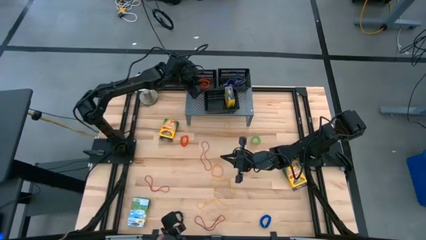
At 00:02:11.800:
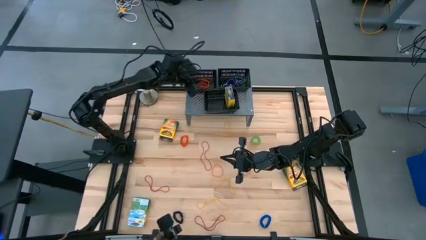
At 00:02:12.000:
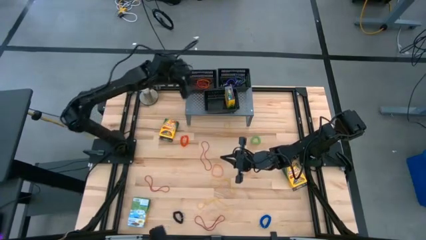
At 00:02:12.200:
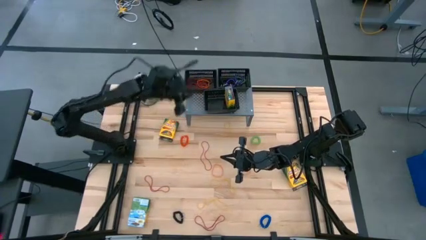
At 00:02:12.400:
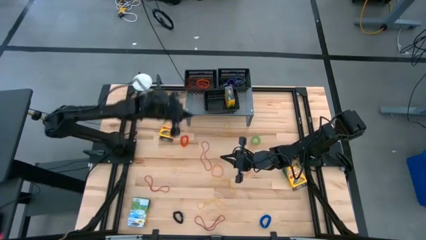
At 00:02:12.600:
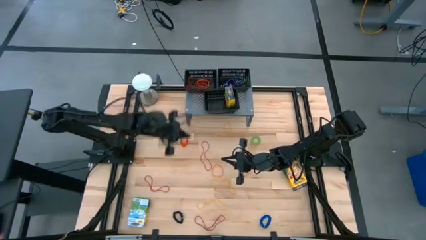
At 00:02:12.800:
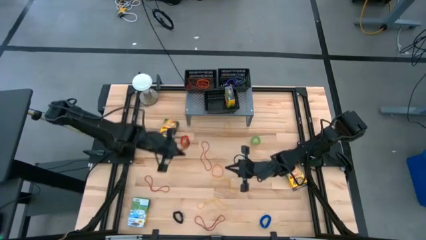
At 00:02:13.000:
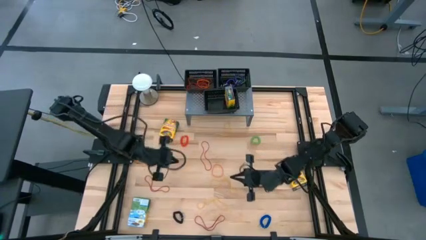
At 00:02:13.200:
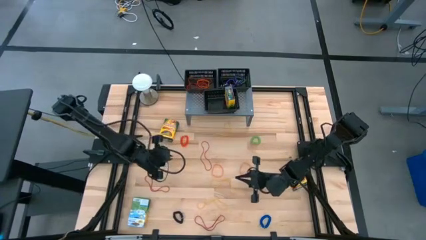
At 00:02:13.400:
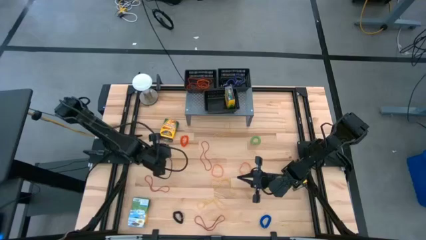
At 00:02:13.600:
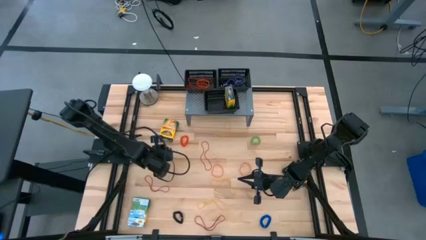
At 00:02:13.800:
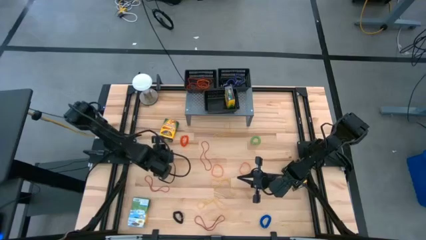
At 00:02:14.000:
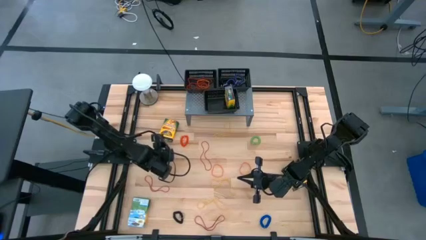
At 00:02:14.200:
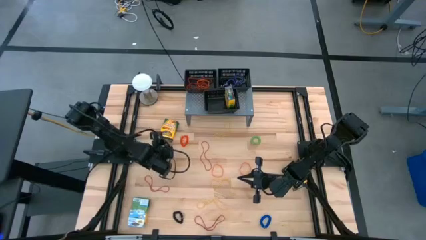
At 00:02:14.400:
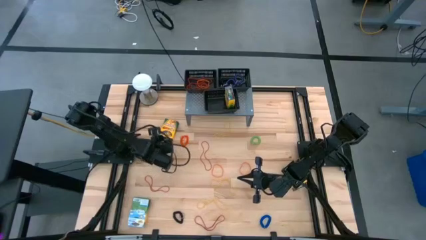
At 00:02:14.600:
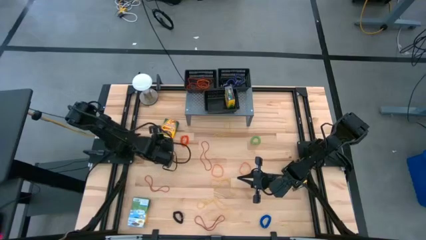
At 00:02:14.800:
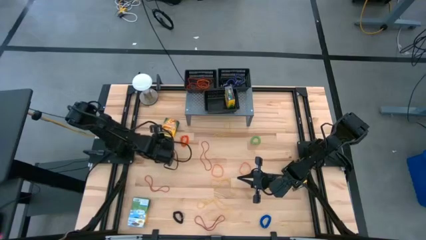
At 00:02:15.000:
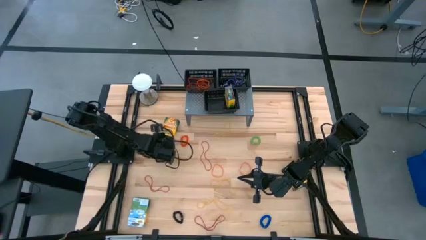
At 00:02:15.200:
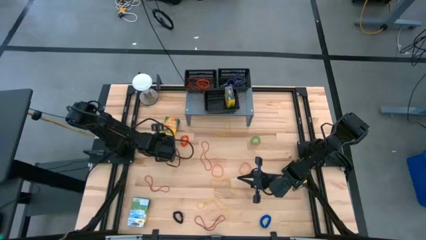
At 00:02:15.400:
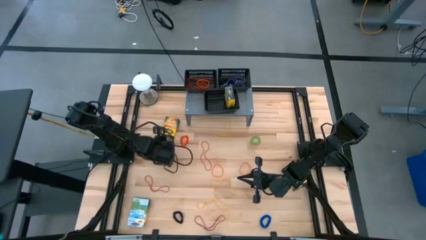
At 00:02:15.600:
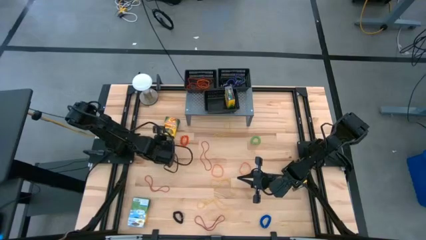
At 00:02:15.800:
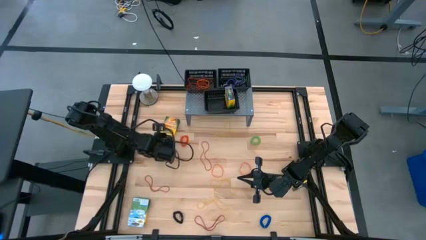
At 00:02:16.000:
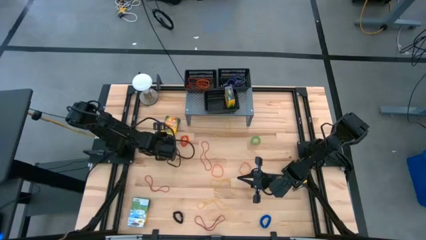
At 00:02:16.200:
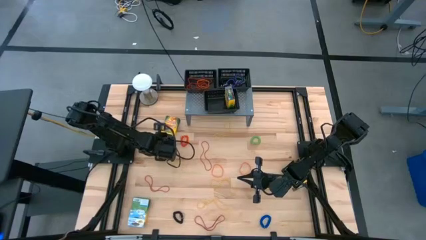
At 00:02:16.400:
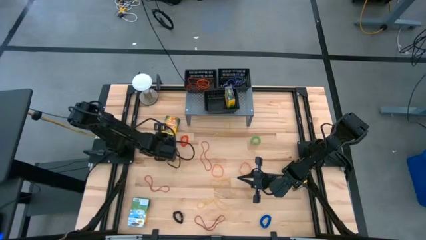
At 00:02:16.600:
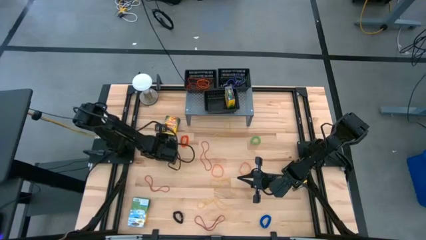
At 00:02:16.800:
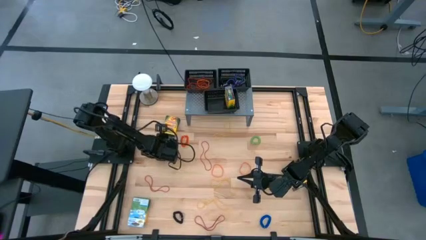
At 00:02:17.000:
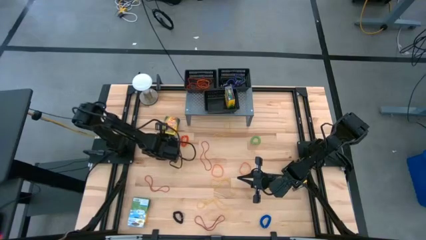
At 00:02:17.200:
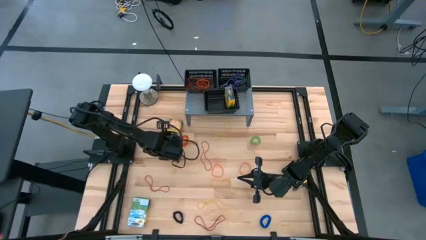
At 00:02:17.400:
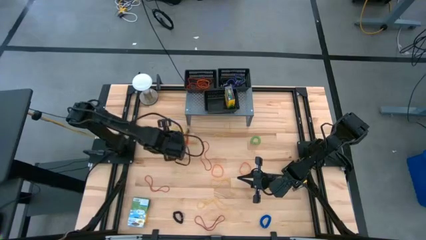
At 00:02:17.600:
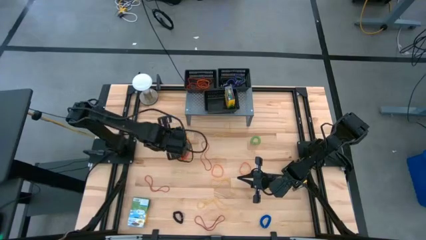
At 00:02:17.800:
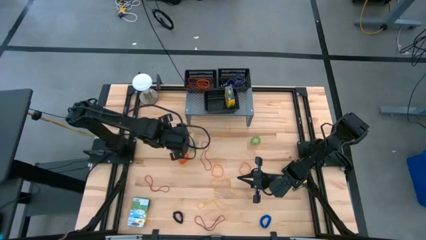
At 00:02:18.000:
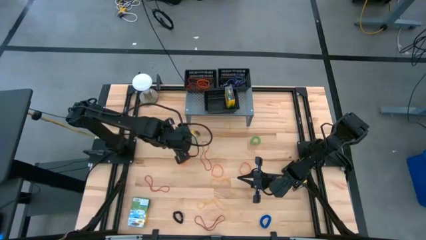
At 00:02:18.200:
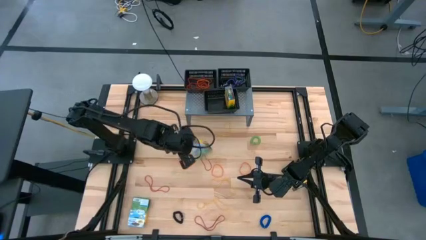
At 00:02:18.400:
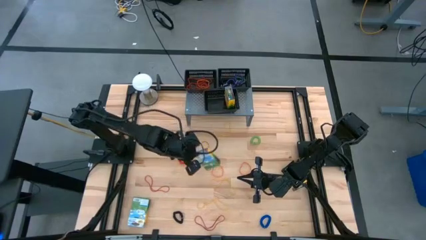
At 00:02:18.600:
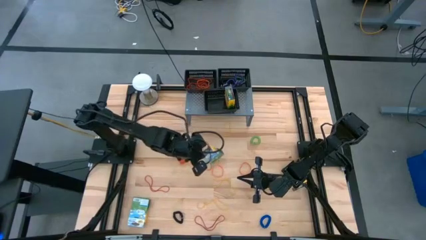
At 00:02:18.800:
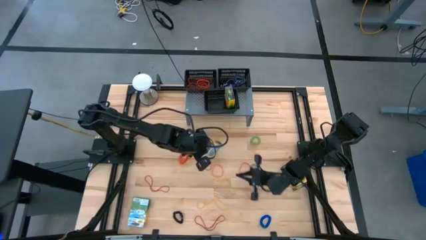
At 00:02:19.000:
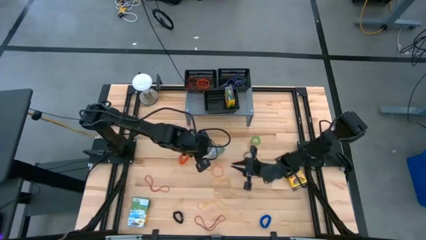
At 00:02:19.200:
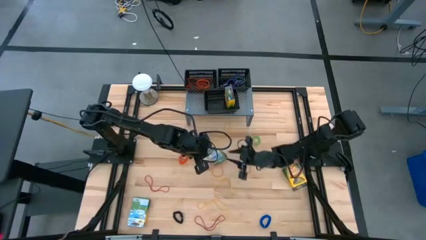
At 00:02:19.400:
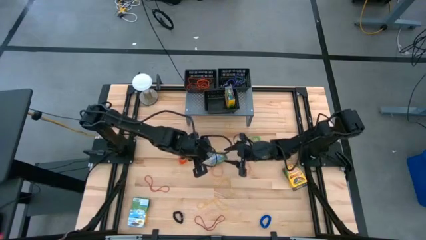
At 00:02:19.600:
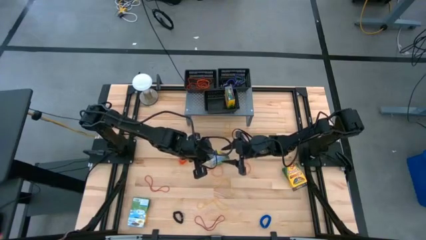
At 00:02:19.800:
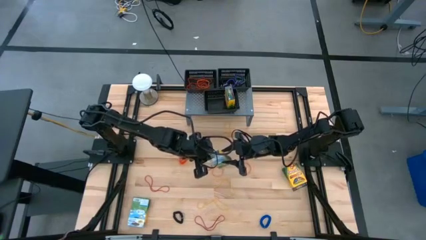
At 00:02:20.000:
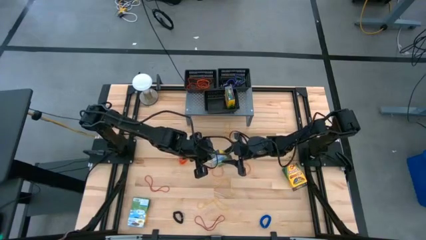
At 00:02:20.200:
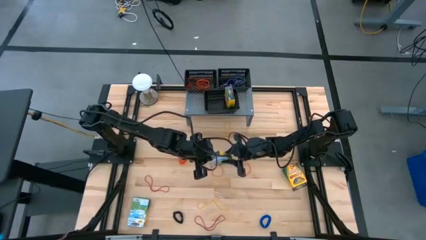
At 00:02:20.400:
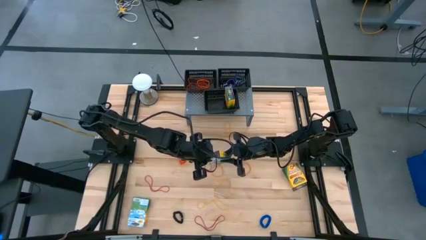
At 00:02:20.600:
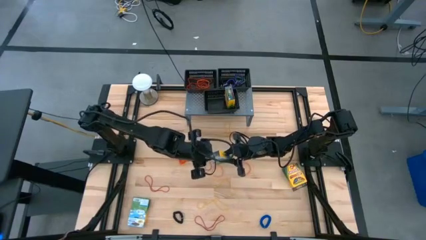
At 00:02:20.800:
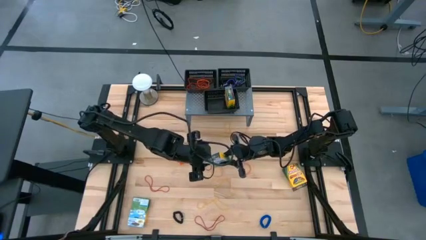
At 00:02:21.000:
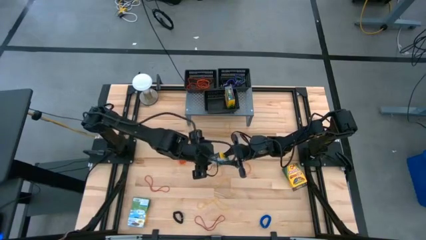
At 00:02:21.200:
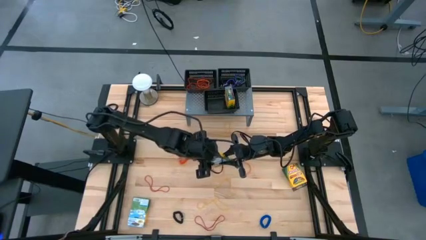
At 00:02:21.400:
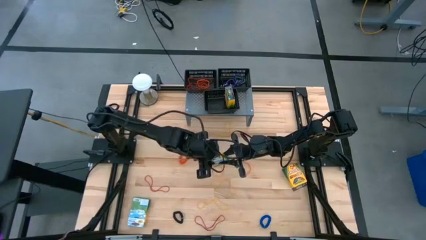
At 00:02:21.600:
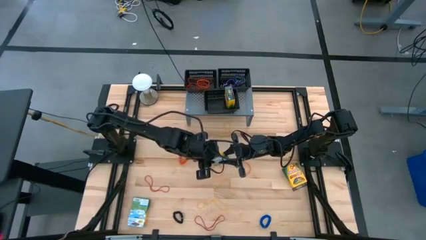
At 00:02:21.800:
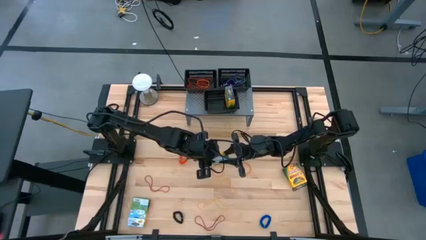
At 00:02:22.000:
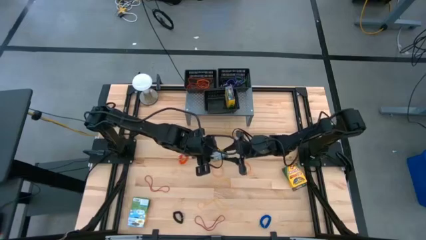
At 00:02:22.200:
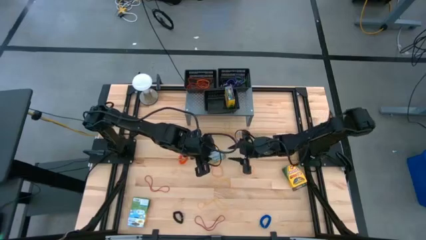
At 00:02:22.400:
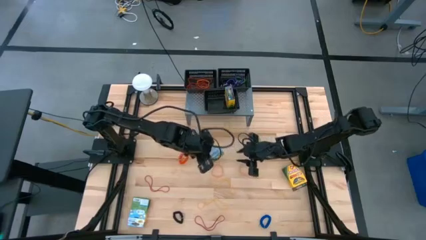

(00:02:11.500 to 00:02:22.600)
Task: Pick & Place Office Desk Supplies
Put the box crayons into the bottom black basket on the shelf
